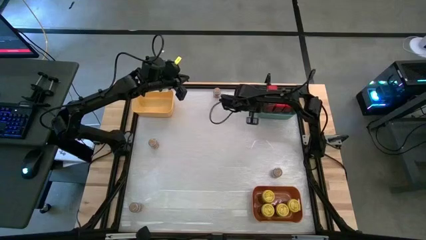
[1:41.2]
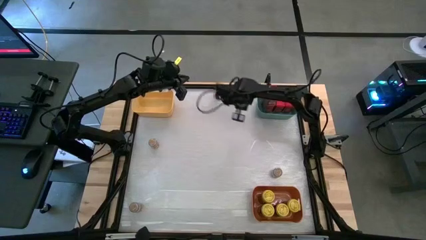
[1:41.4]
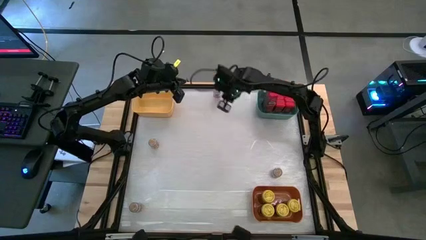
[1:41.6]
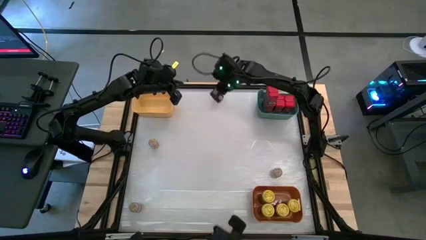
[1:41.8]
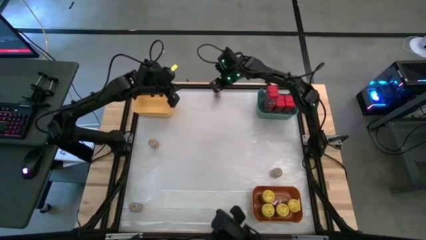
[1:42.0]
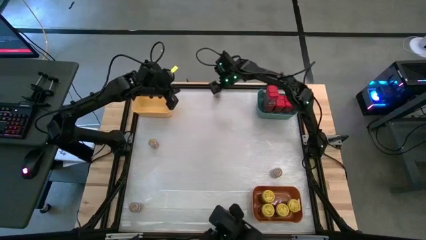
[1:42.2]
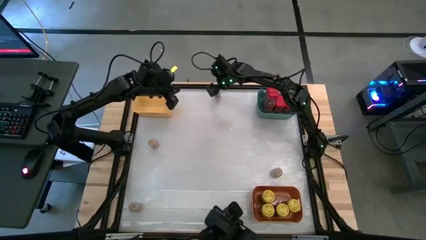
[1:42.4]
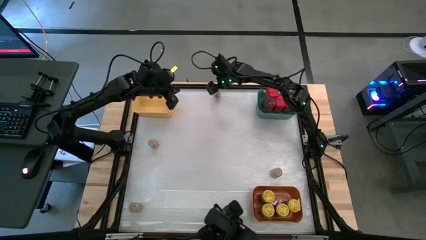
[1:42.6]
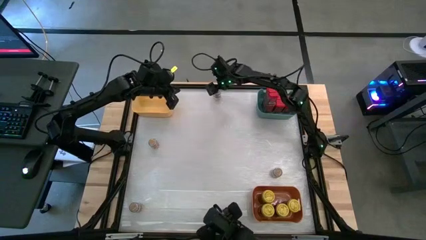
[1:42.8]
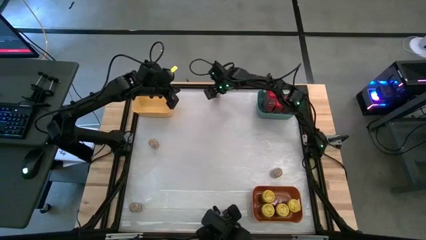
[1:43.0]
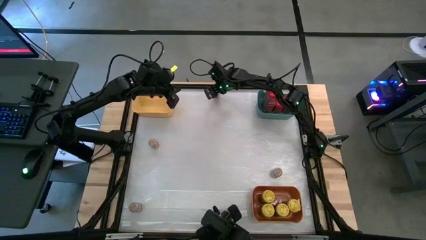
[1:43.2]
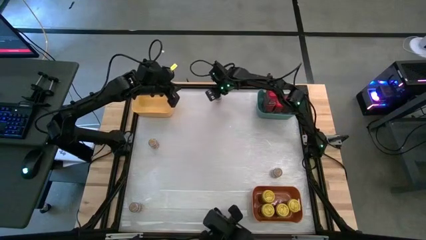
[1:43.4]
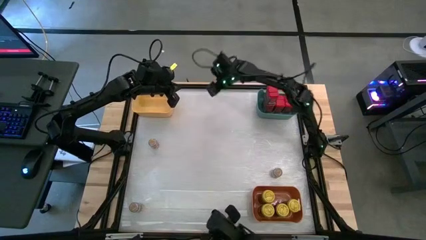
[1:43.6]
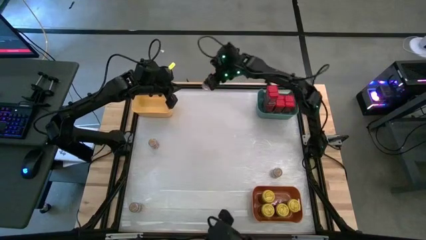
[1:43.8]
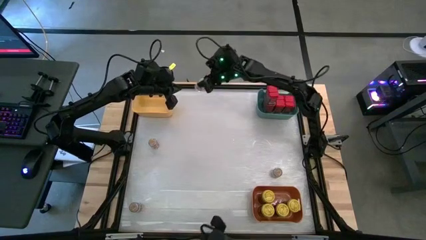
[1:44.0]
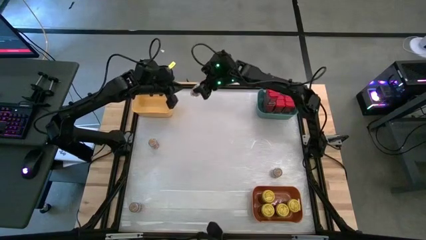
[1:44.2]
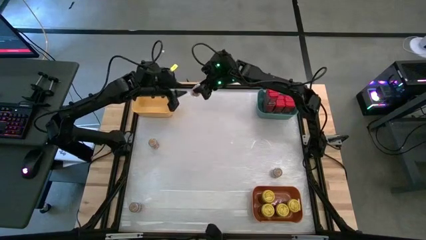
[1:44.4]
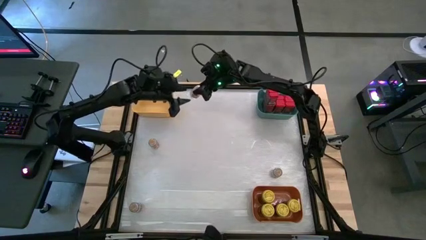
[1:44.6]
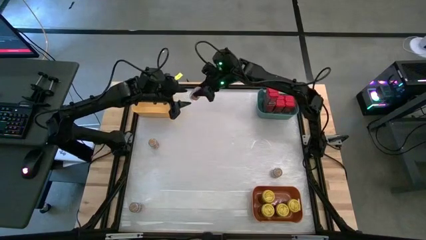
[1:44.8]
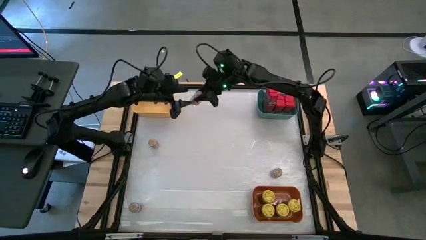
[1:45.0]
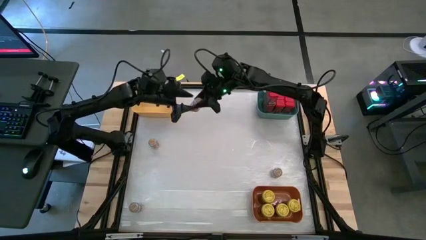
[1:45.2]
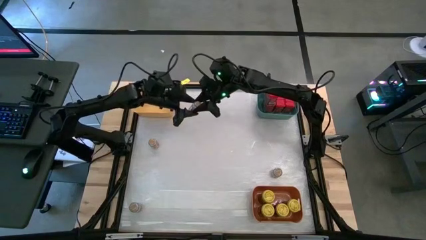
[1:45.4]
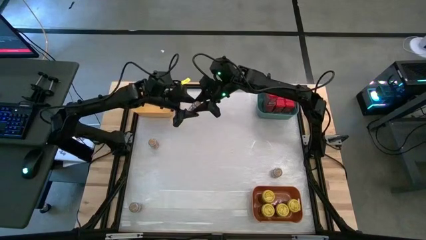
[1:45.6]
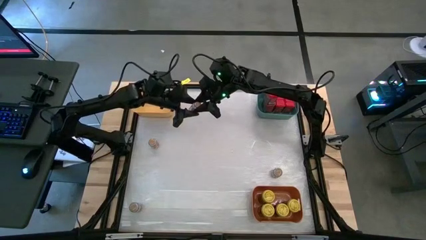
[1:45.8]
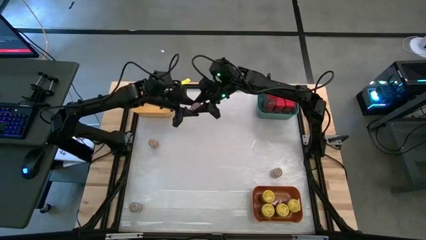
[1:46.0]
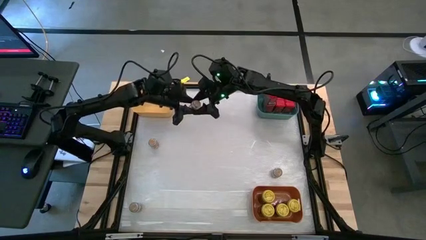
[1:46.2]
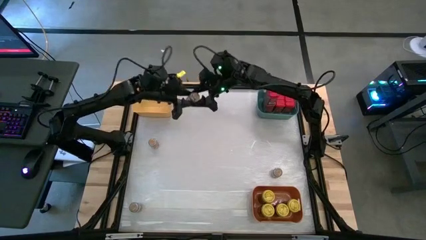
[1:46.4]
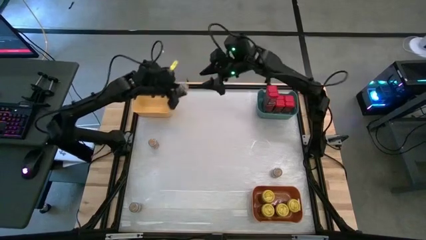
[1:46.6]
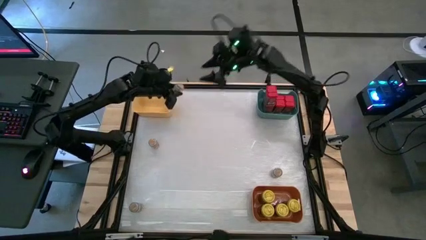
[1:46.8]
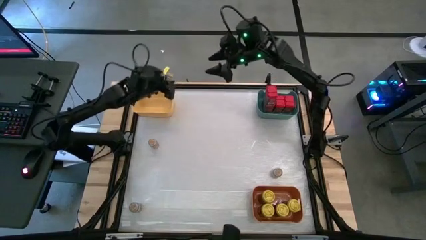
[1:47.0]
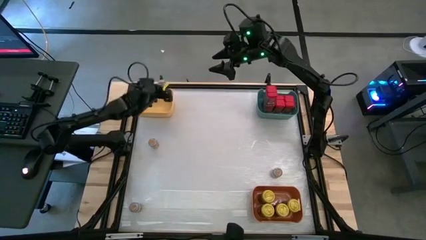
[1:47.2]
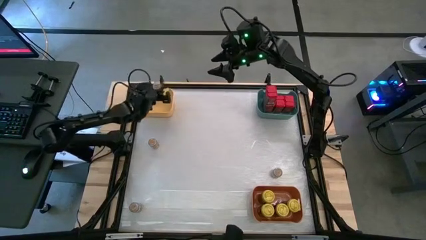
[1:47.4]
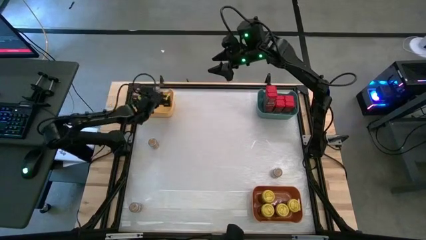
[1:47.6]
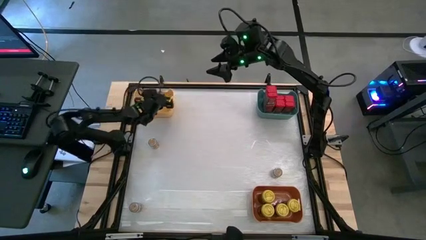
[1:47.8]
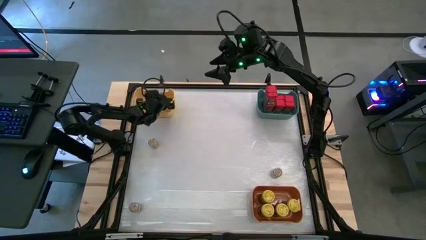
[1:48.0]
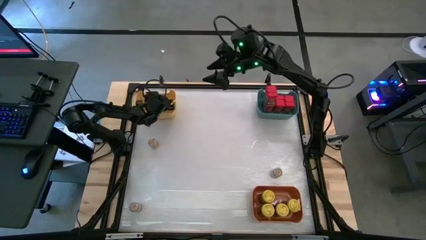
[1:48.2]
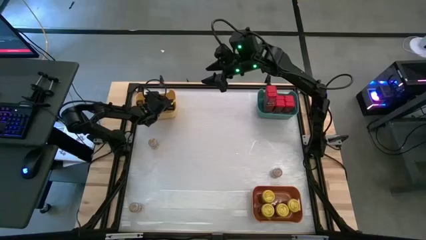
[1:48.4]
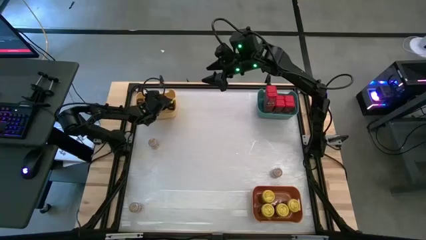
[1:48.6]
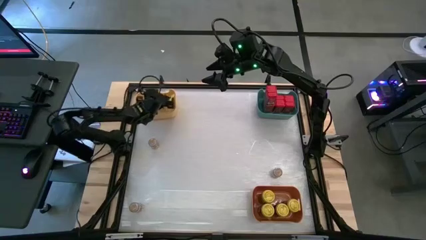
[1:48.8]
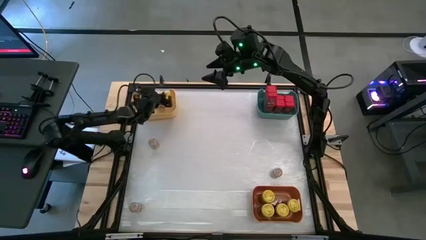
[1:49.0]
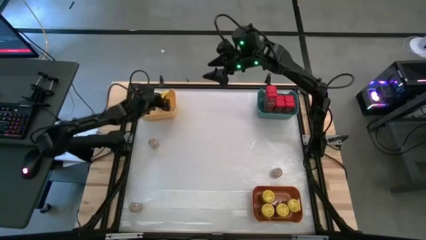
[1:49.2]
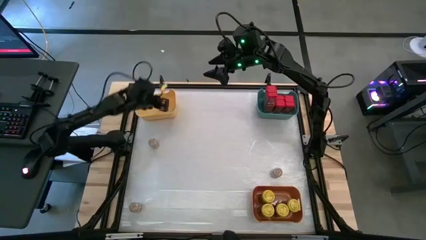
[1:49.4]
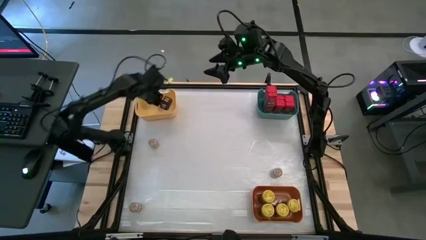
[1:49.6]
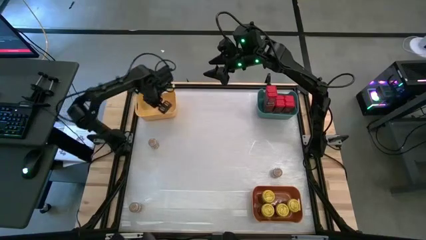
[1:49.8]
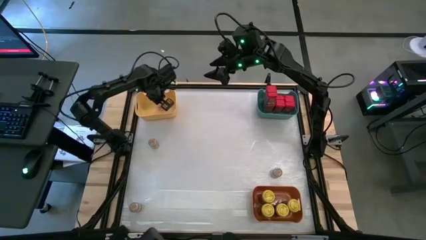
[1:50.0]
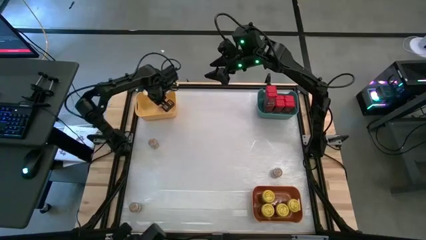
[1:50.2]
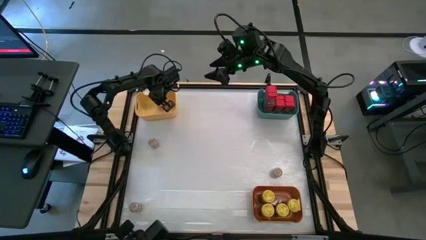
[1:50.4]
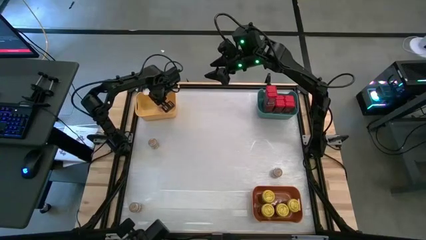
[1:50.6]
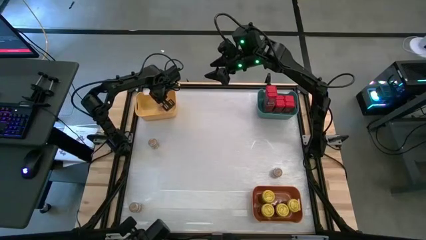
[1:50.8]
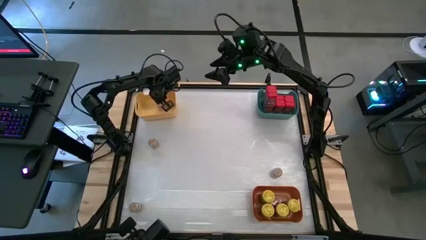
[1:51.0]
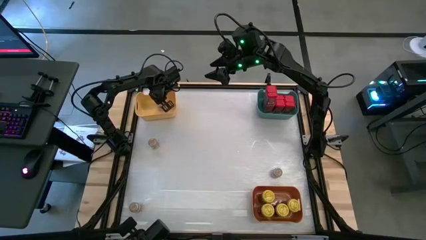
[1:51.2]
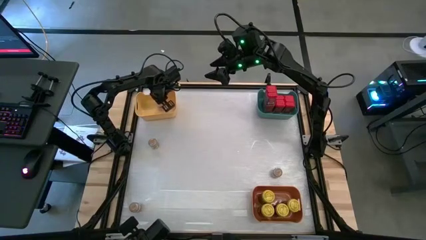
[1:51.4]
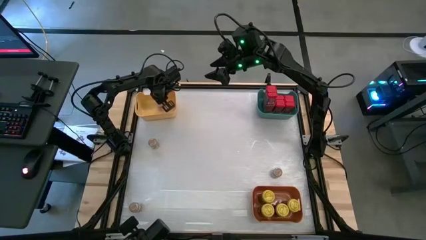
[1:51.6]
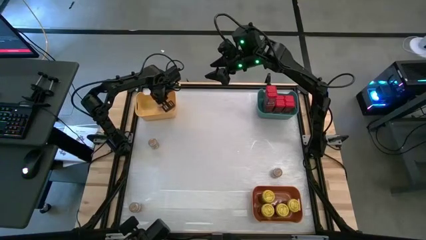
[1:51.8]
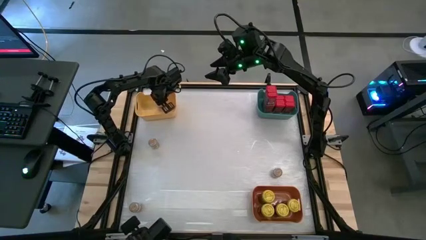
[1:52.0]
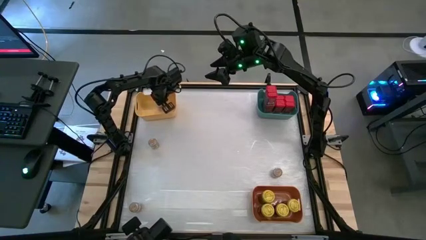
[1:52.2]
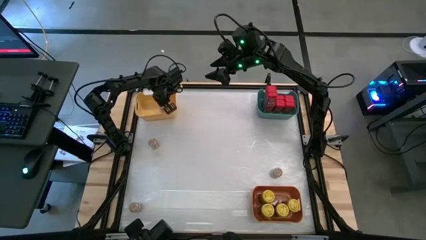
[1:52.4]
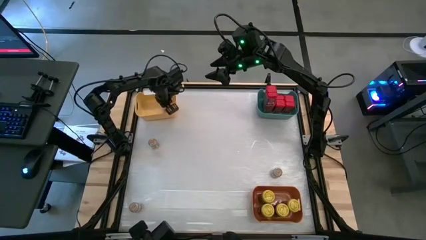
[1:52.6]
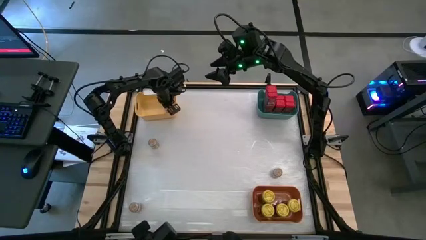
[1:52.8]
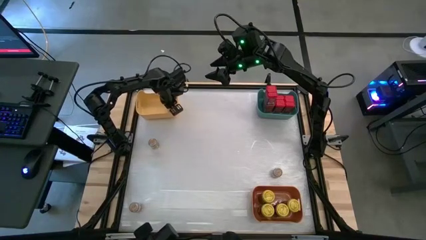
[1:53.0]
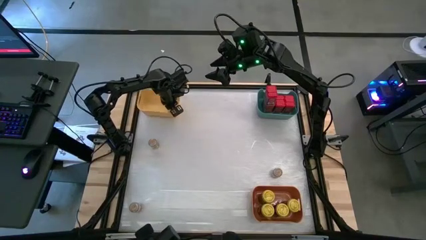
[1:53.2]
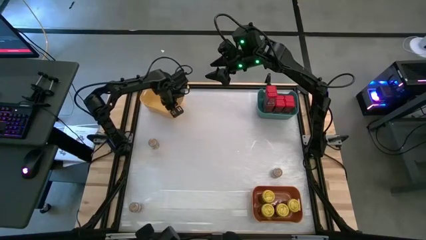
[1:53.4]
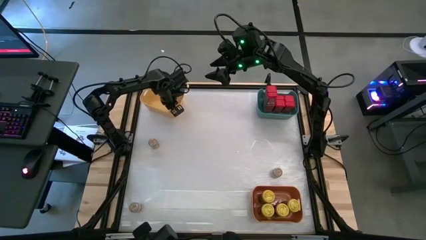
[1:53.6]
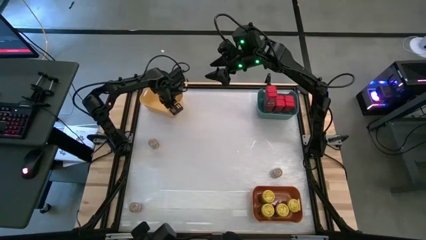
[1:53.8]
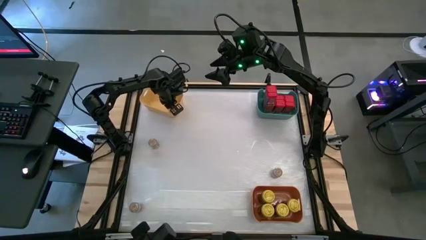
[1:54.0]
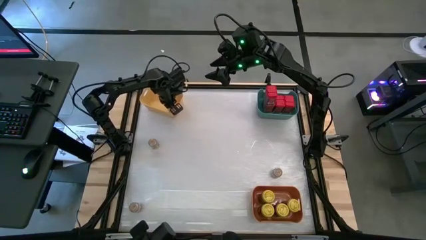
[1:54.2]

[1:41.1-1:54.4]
Task: Sort spices by type
Put the top brown seasoning bottle into the yellow bin

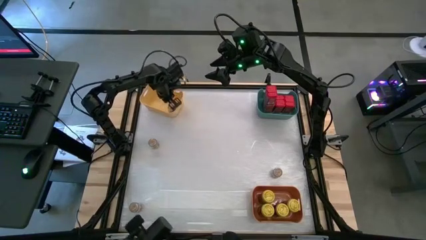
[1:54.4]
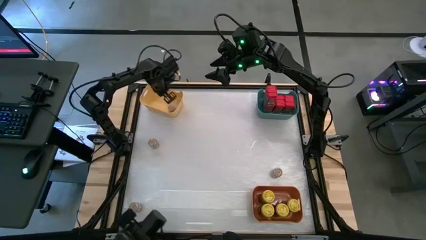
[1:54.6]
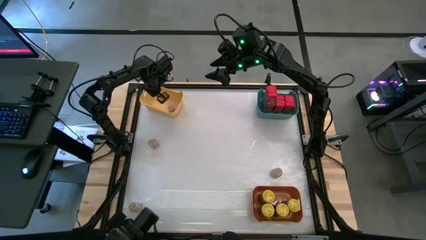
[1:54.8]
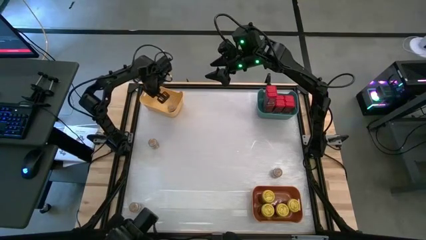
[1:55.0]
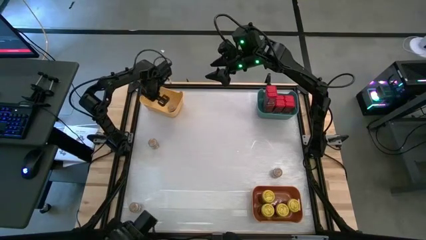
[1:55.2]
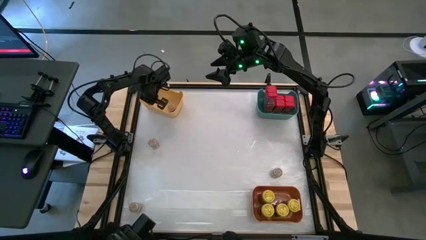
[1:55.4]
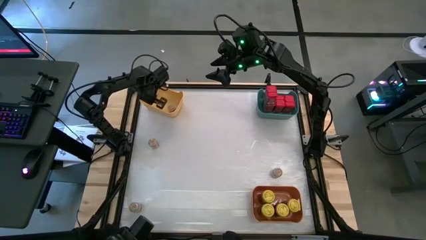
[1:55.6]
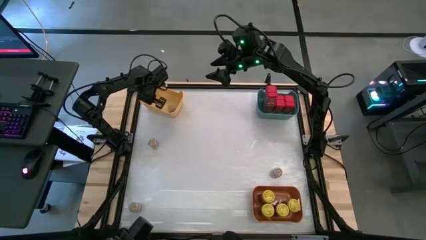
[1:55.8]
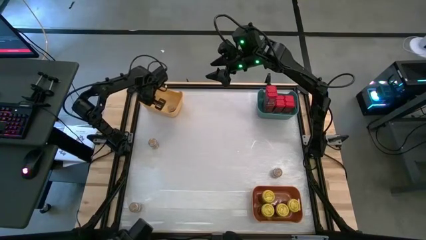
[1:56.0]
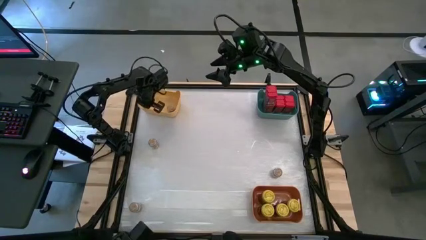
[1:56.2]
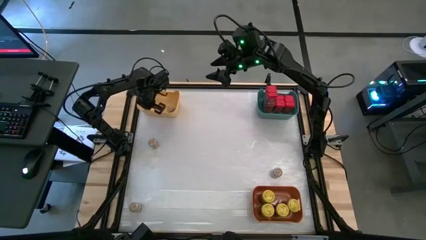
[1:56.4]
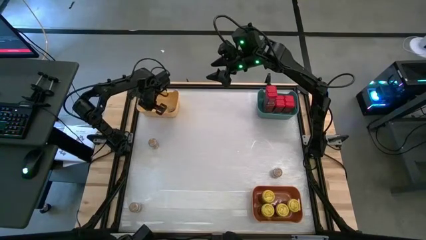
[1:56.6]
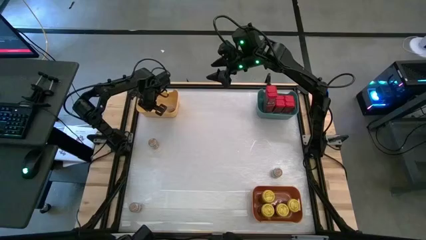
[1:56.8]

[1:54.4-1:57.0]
Adjust the yellow bin

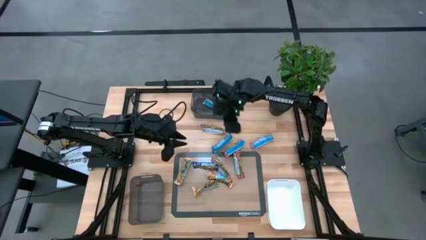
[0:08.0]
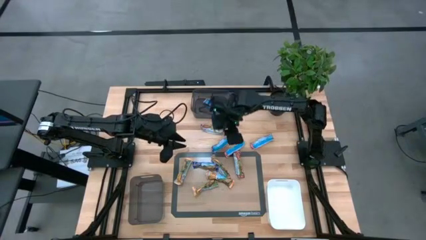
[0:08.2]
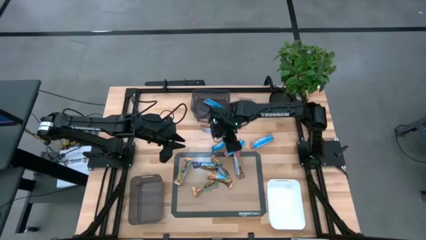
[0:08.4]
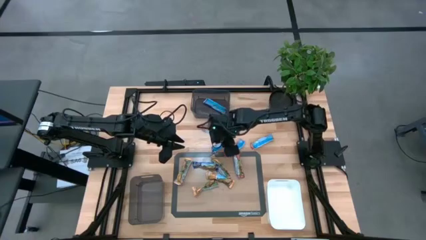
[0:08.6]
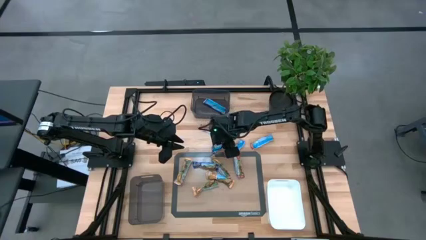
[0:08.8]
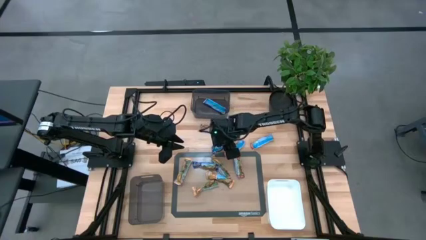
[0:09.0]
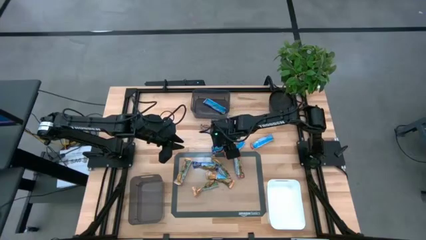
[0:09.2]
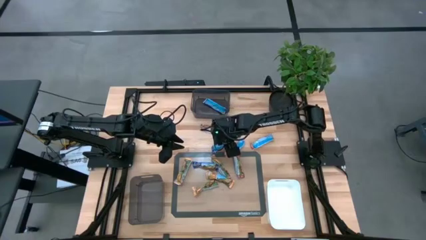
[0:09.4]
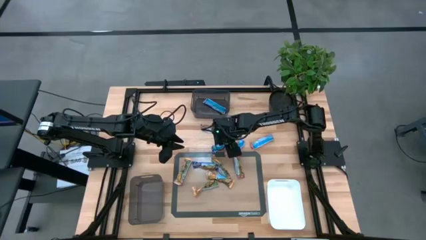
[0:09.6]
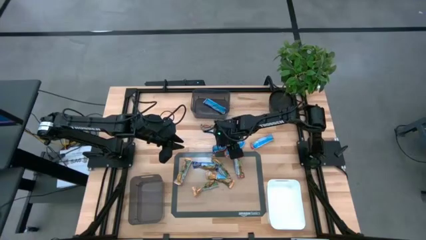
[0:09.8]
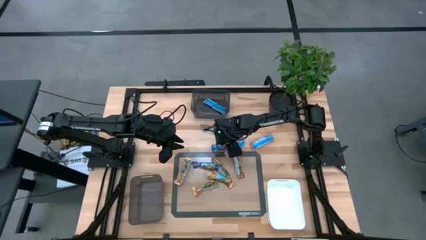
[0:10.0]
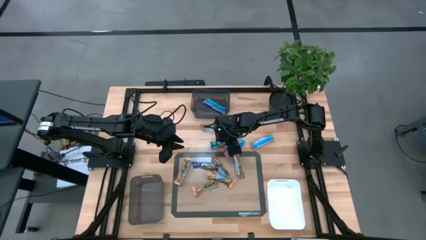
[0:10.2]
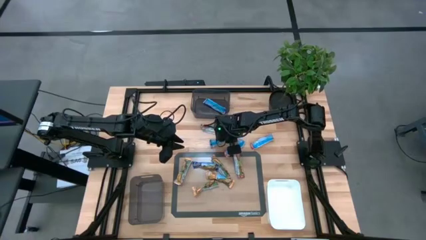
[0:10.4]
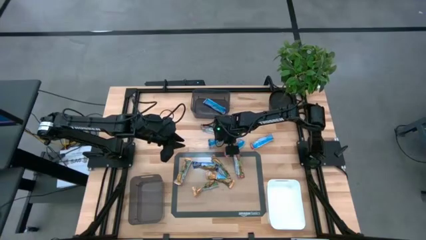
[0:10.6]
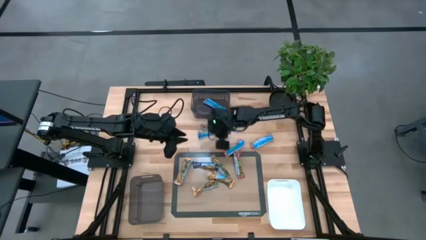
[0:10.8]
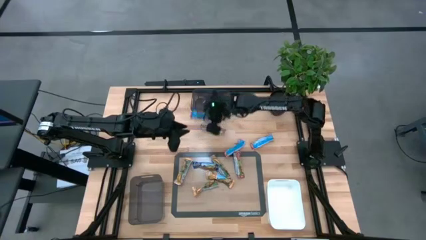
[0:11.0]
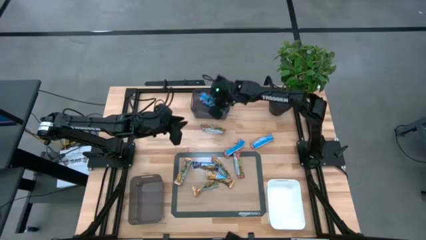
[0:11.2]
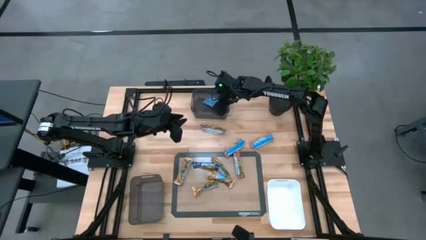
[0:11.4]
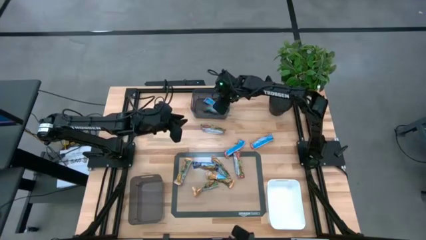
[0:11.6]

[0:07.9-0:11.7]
Task: Pick and place Granola Bars by type
Put the top blue snack bar into the top black transparent bin
